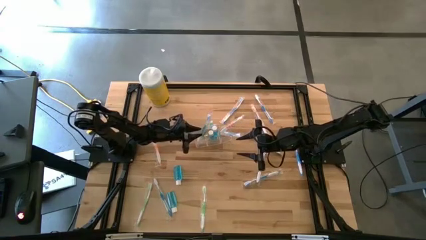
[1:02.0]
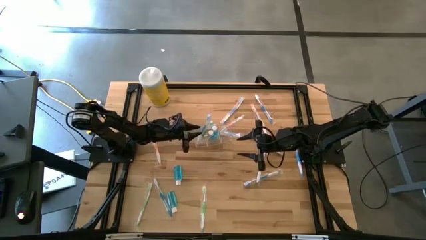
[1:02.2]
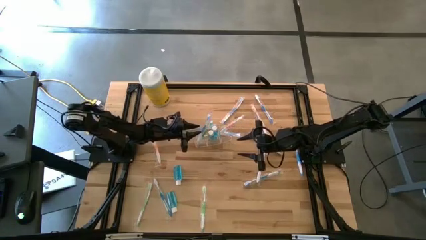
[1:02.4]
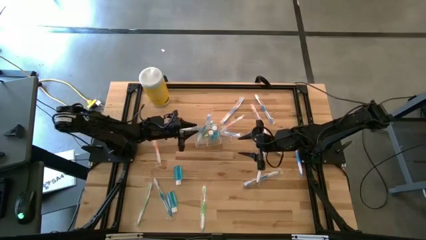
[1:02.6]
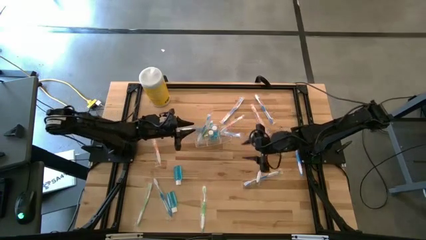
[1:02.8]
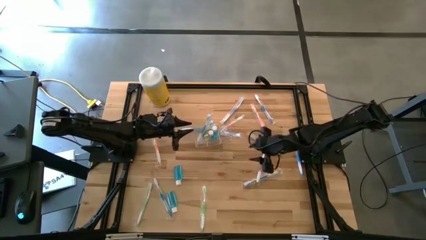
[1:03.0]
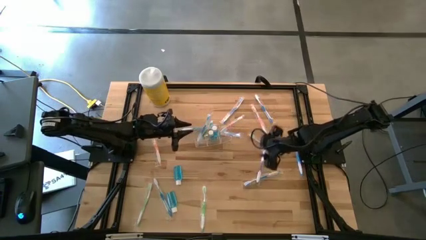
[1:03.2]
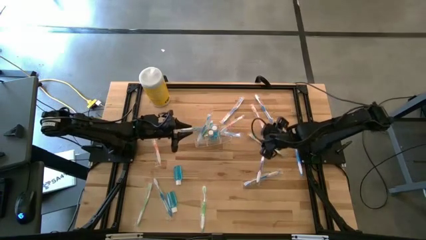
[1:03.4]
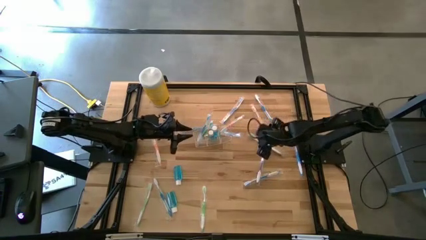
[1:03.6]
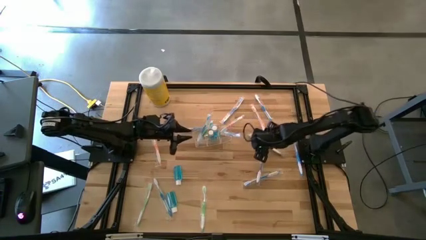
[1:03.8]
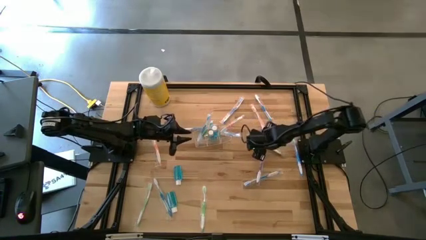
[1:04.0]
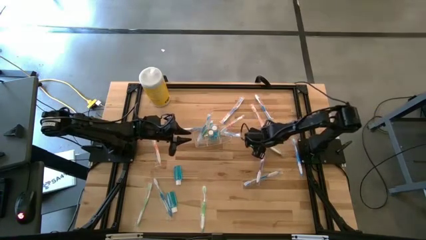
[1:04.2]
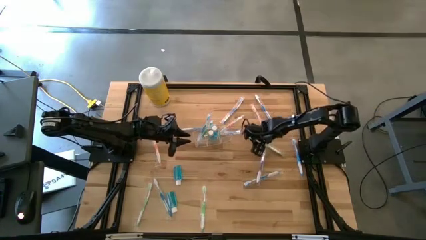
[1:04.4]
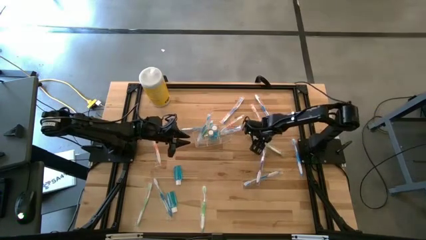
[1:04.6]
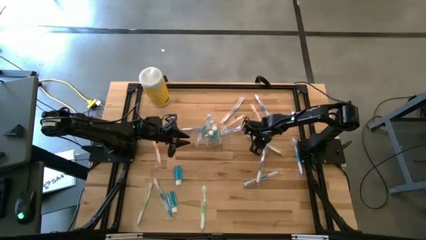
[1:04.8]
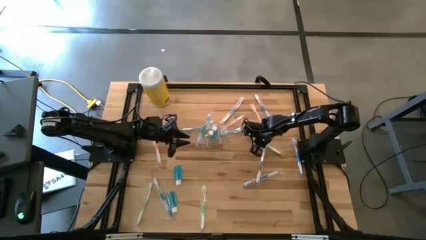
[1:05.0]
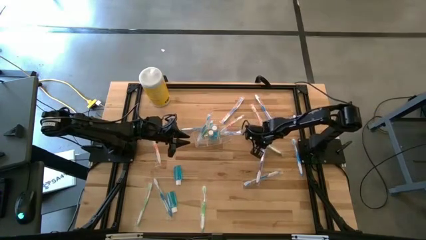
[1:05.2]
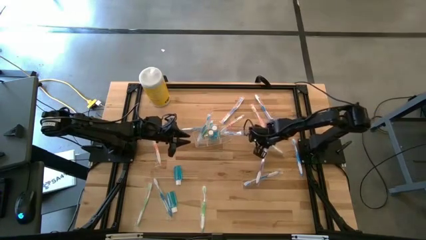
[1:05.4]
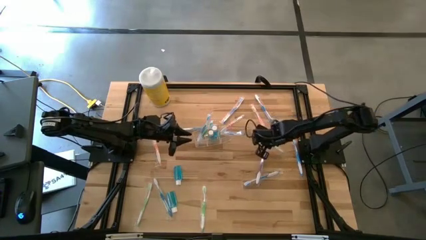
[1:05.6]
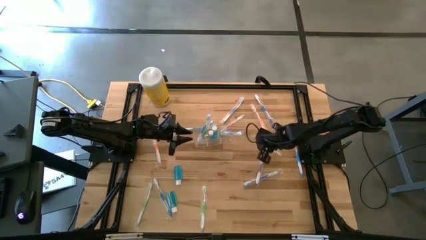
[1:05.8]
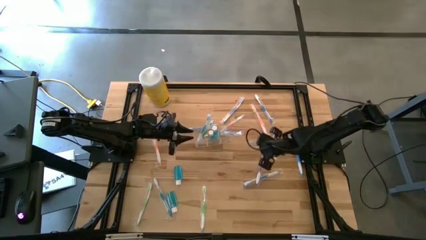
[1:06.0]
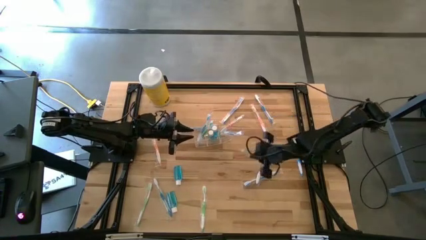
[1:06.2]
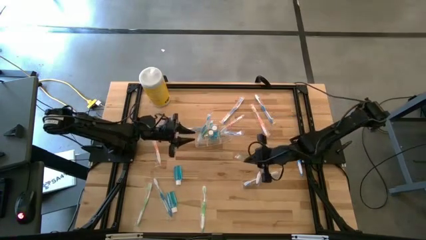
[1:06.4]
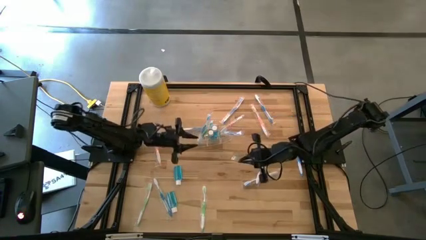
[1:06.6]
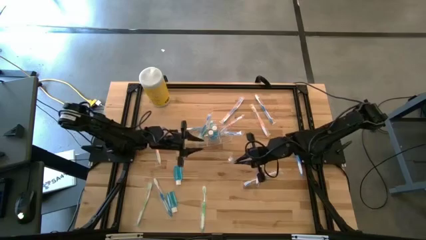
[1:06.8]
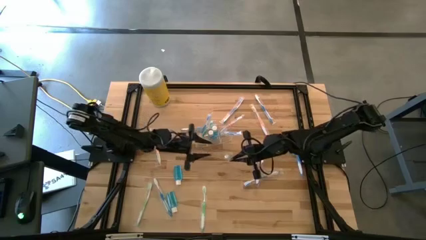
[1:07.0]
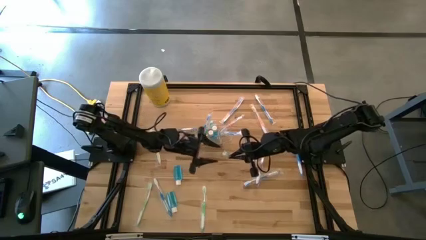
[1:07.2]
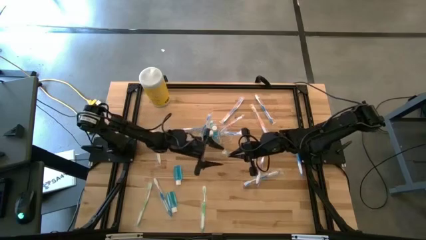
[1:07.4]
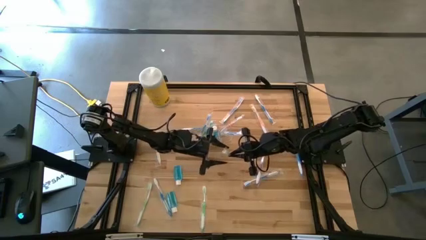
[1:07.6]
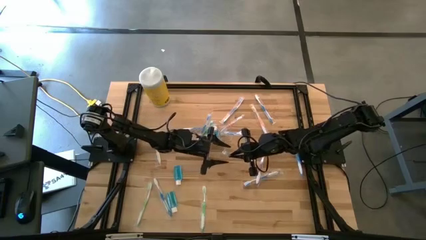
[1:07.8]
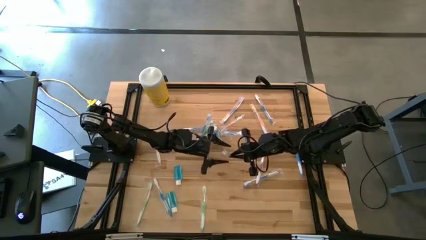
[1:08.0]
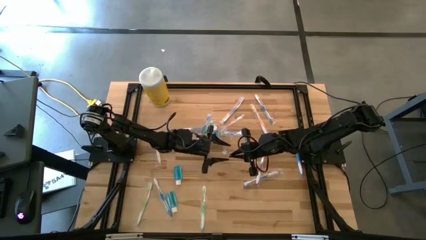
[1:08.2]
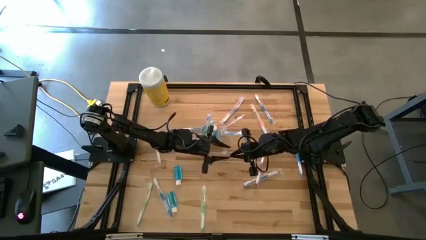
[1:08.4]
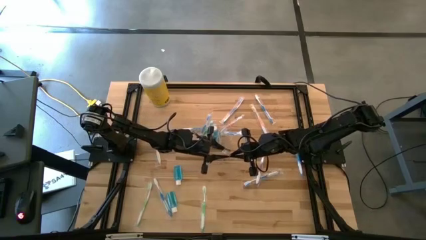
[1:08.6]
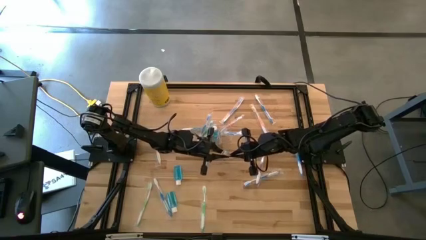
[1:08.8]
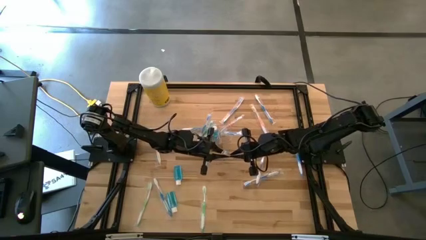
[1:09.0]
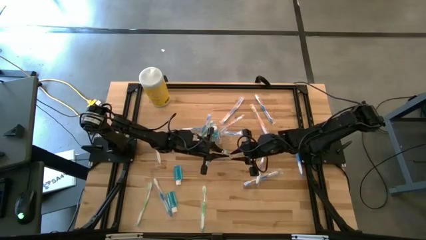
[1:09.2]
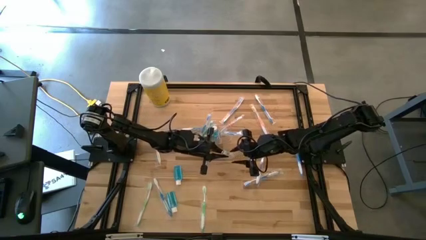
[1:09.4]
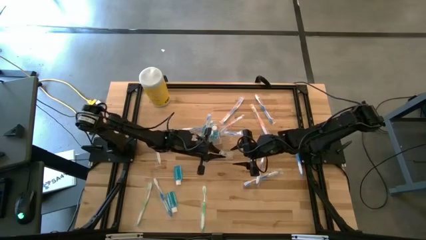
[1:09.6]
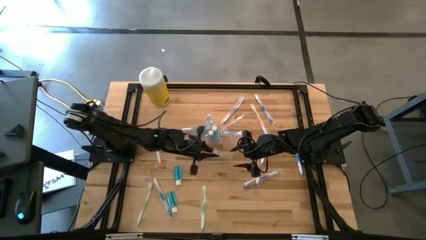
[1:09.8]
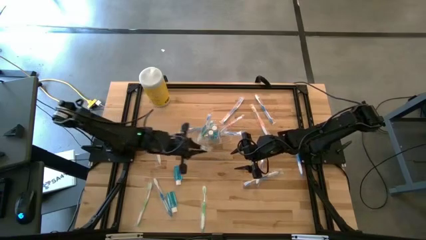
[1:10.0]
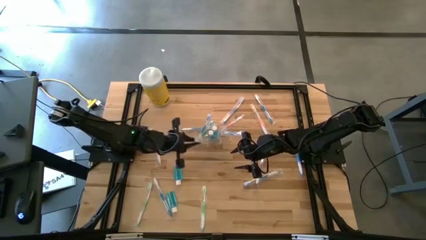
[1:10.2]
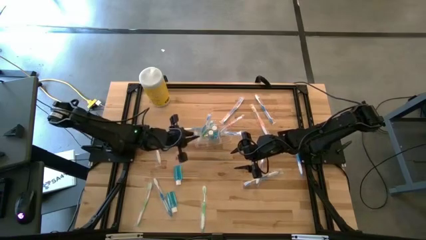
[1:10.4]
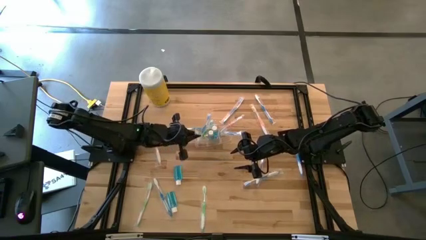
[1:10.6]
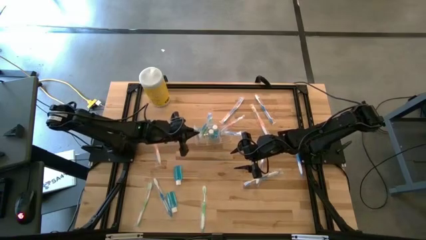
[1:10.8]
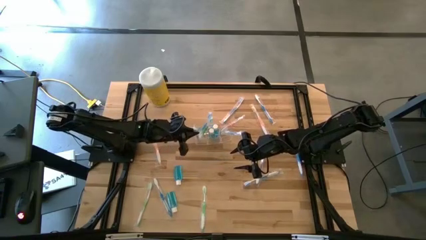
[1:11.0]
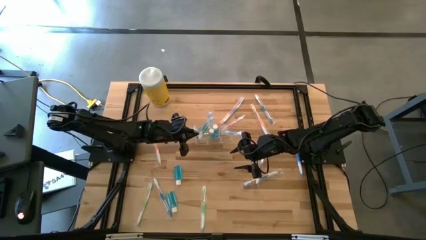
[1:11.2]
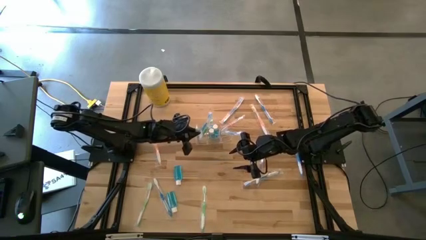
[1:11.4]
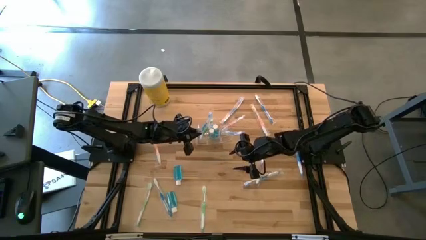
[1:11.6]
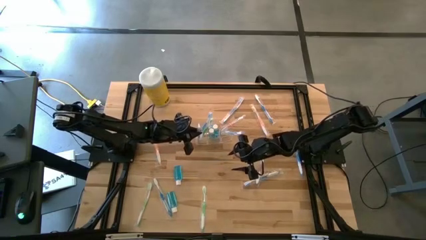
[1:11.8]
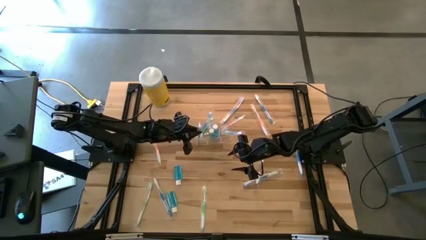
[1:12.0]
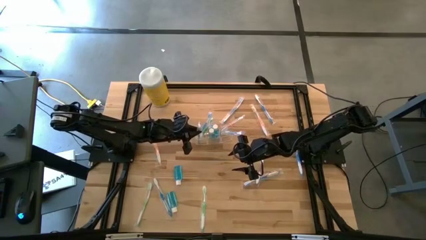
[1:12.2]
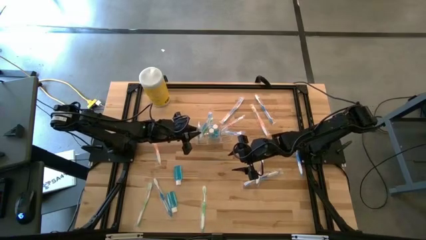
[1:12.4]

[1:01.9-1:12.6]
Task: Pick & Place toothbrushing station
Put the green toothbrush into the transparent organizer

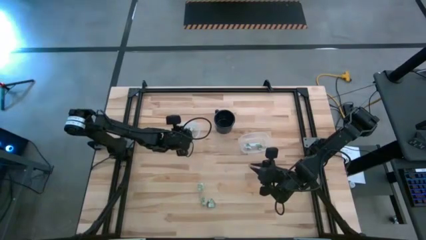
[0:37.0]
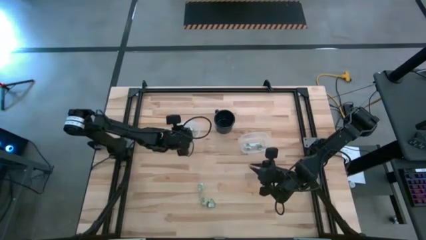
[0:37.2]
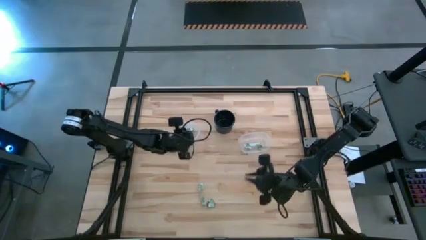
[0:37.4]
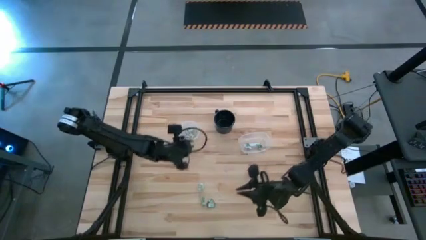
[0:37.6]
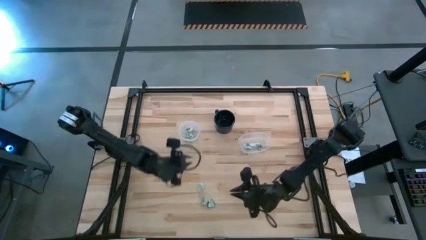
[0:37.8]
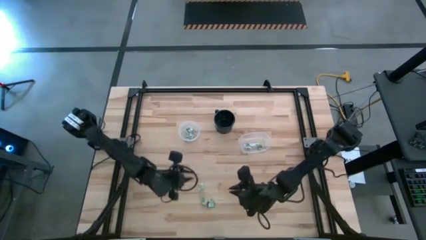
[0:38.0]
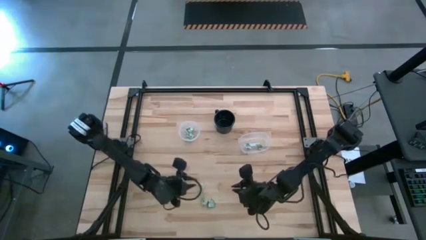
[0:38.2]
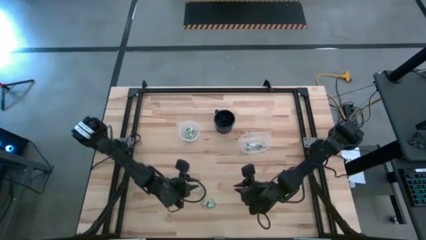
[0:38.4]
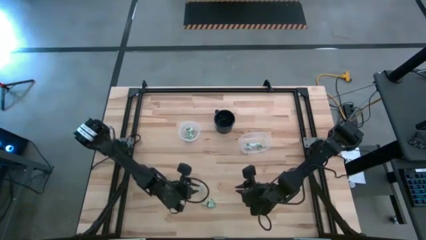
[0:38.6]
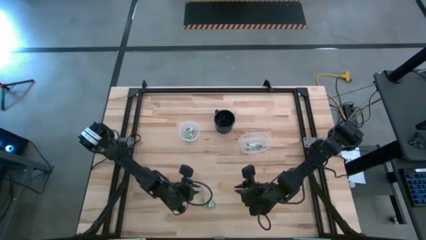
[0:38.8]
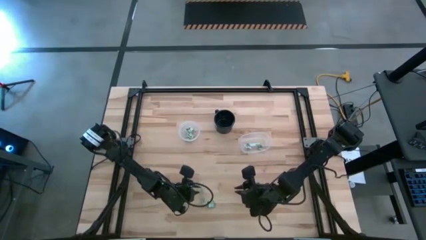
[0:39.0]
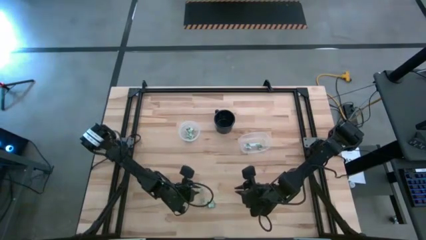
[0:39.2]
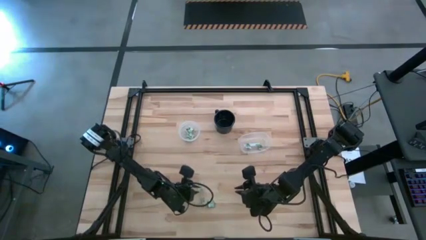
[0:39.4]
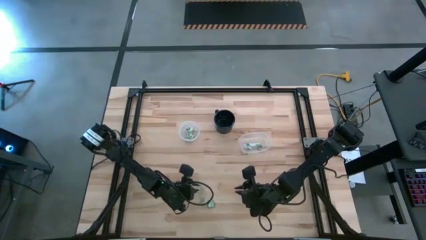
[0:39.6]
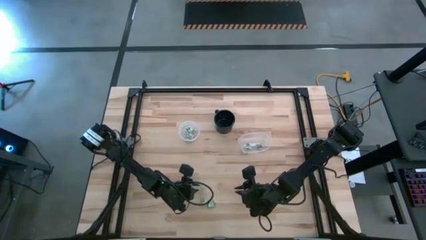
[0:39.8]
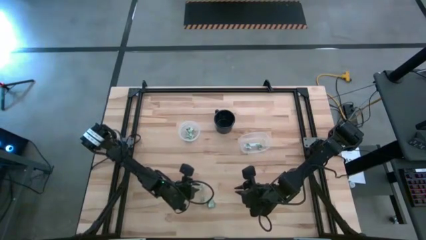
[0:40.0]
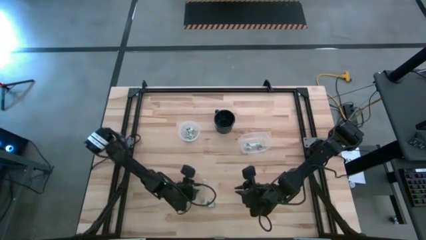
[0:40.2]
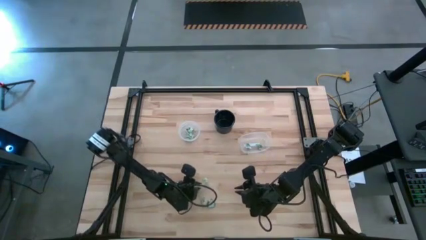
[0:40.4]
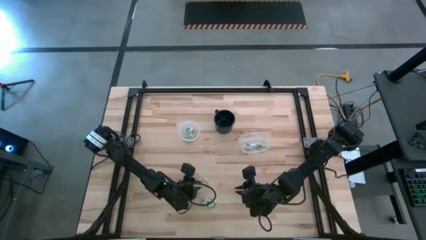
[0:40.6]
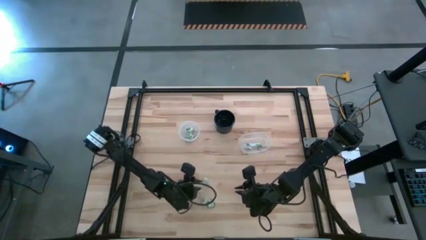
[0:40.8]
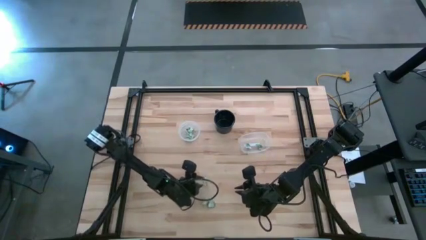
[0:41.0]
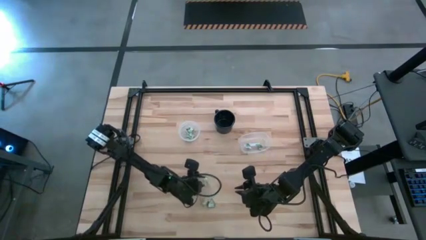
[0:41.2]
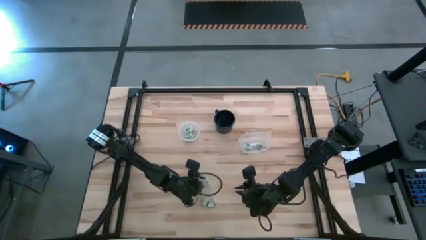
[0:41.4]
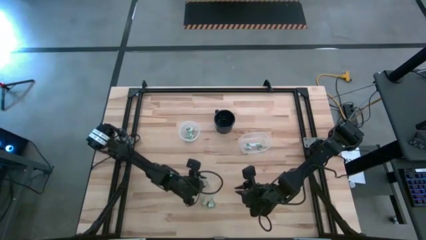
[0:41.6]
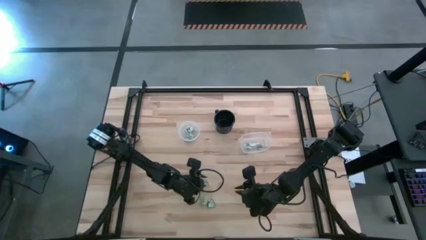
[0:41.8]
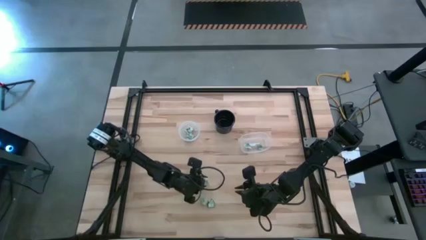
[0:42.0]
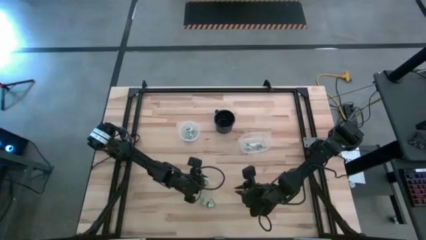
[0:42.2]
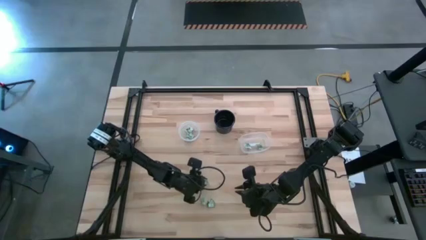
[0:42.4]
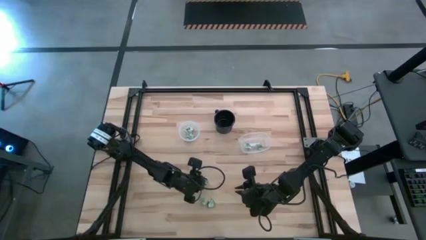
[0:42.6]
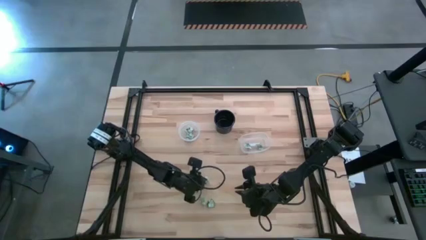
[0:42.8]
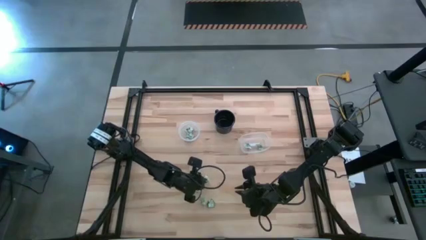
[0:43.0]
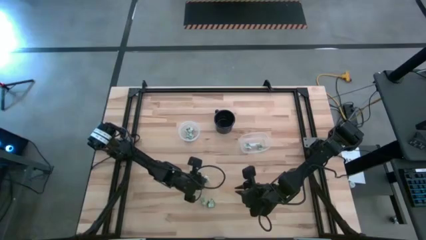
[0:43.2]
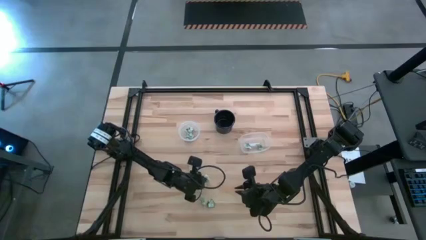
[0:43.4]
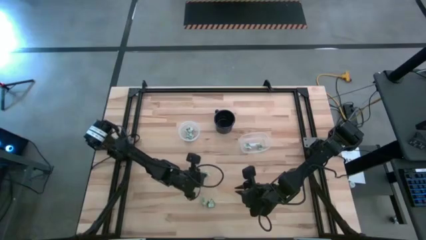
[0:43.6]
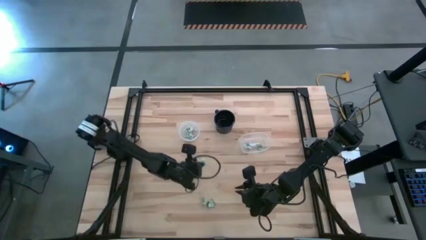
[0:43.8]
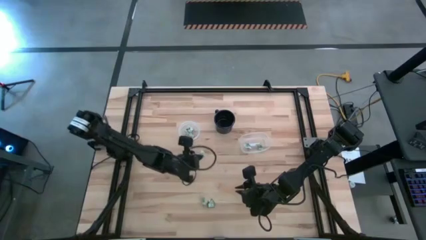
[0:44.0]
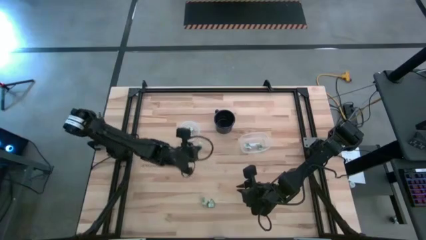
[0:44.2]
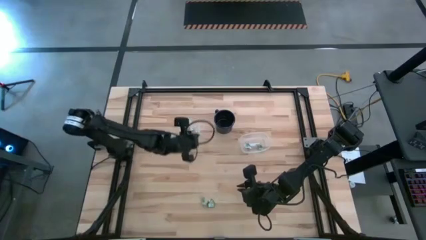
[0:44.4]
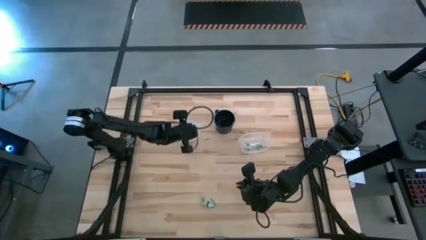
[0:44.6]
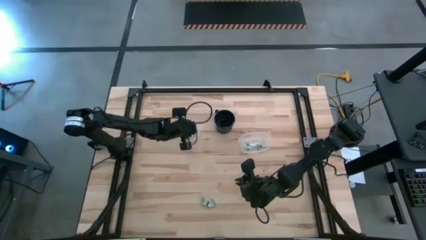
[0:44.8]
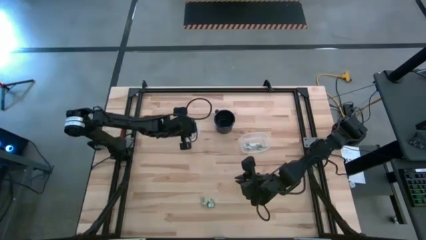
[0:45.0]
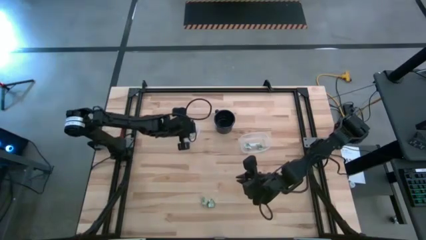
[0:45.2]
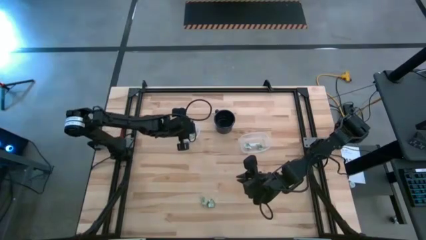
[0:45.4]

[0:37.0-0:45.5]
Task: Pick and place items into bin
Put the stevia packet into the left transparent bin
